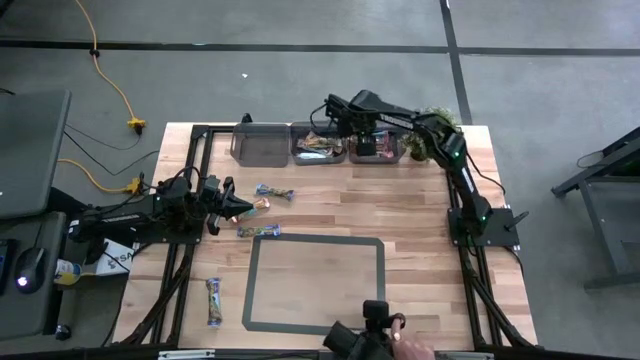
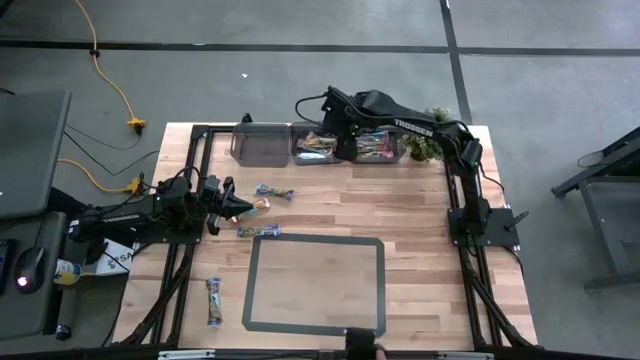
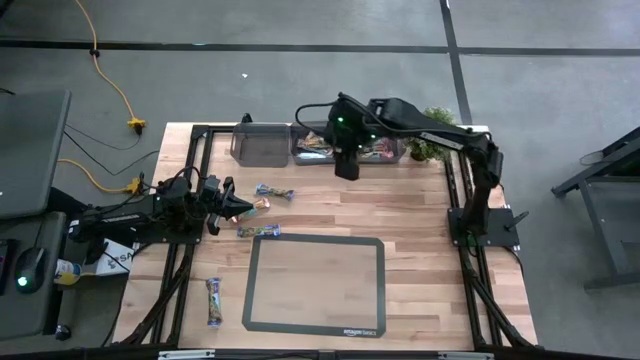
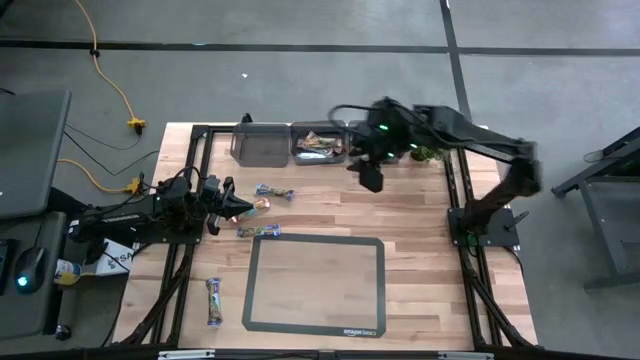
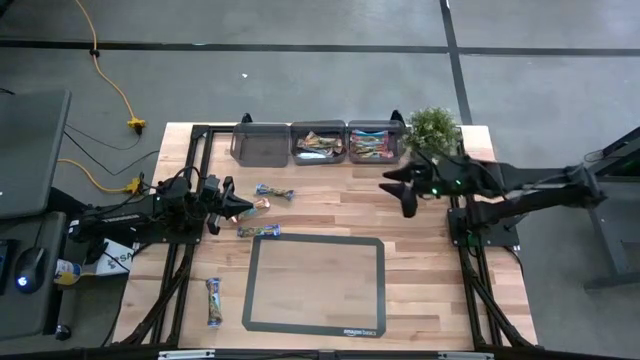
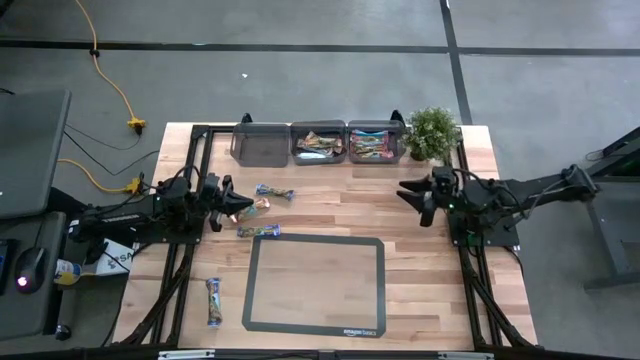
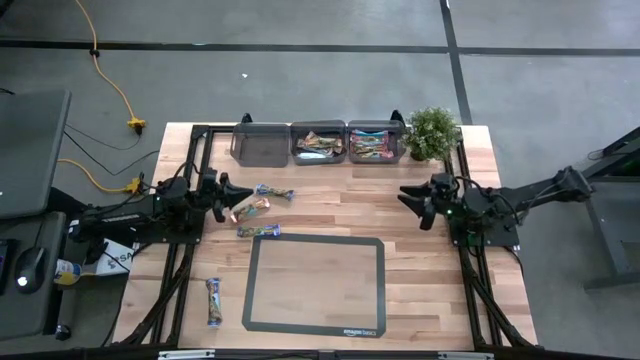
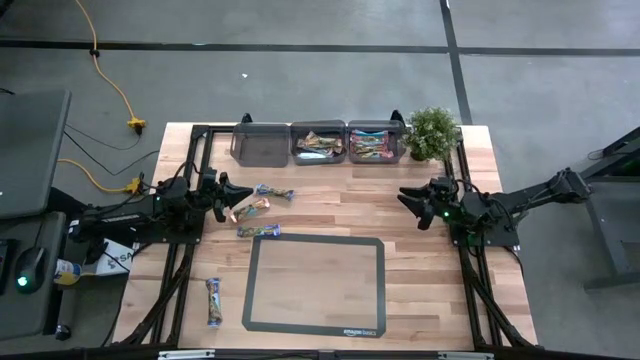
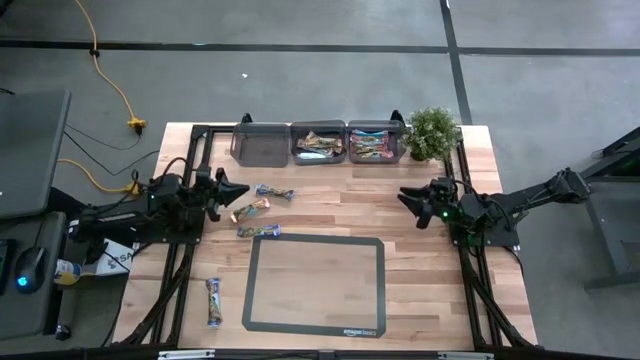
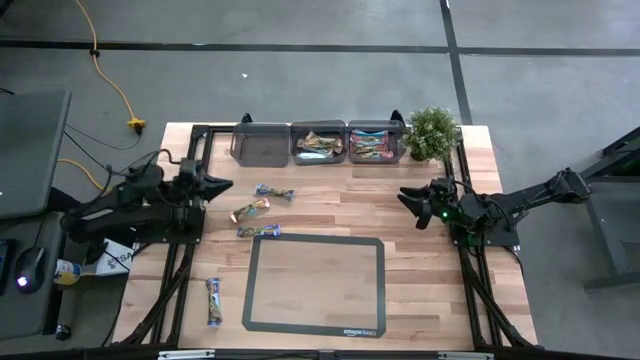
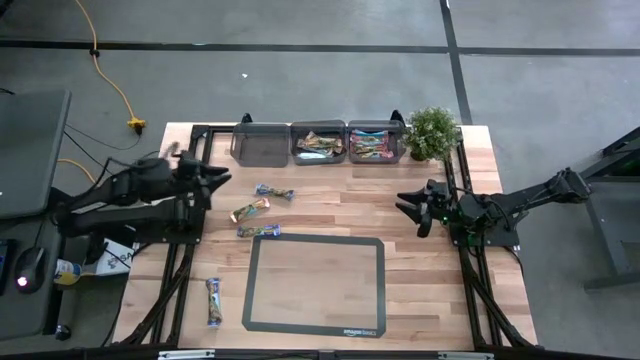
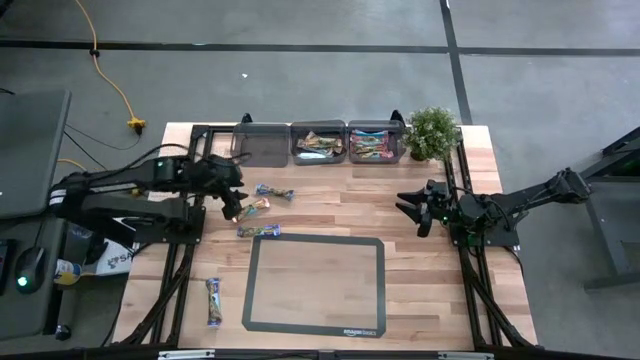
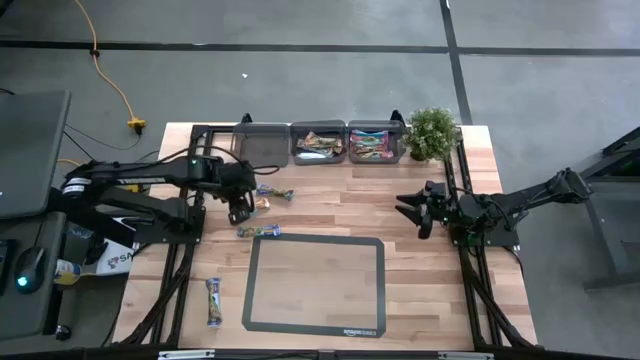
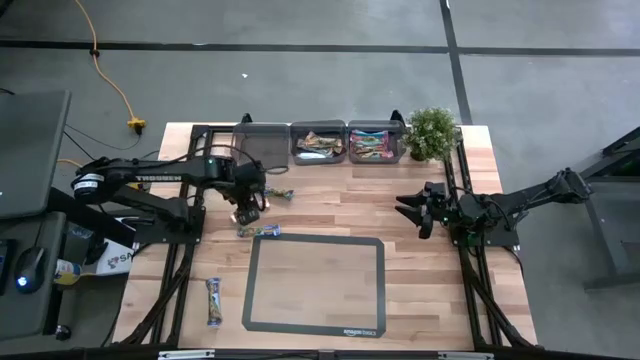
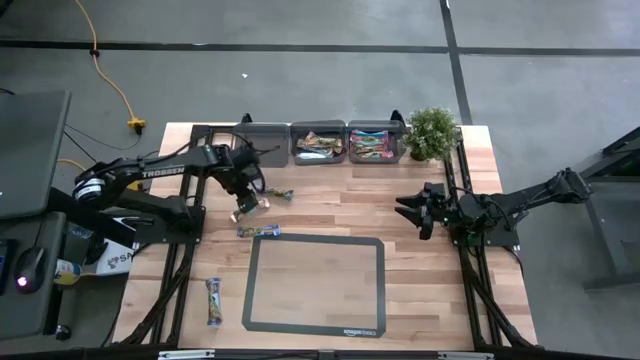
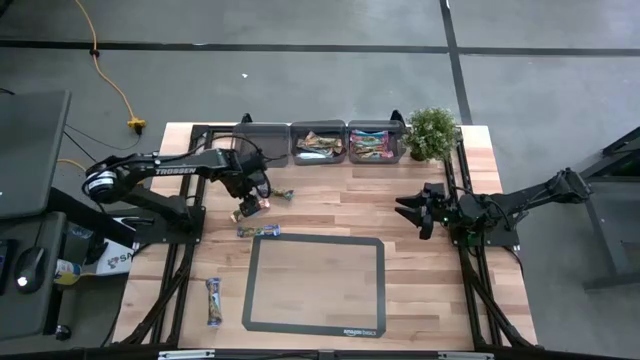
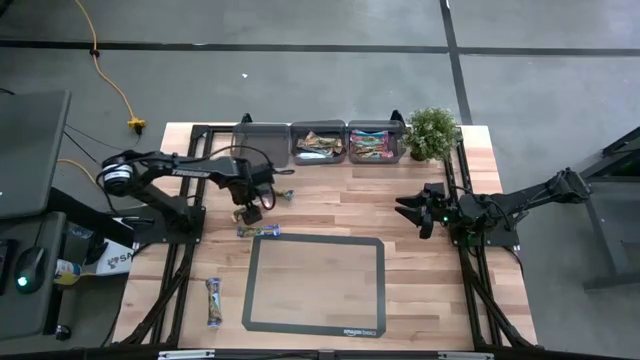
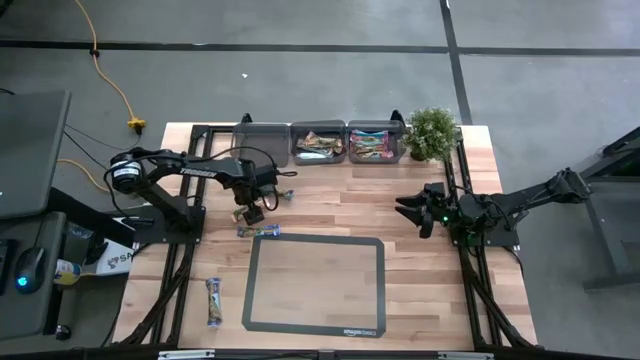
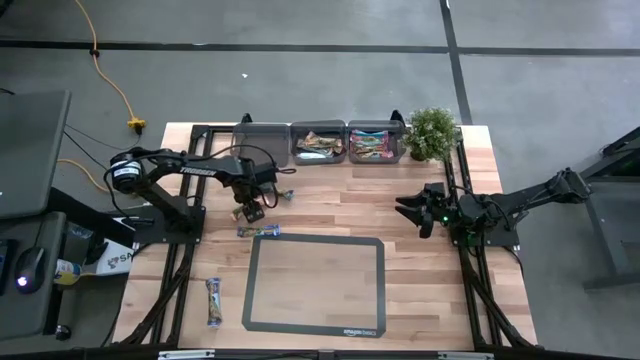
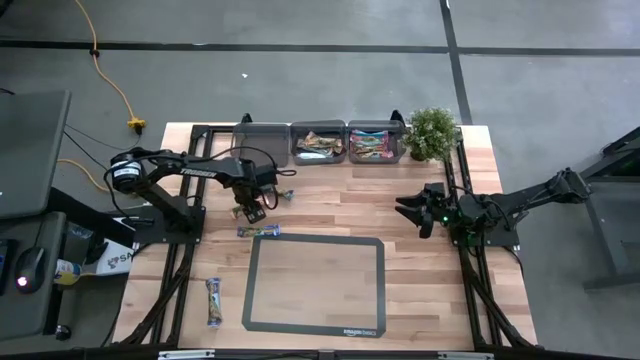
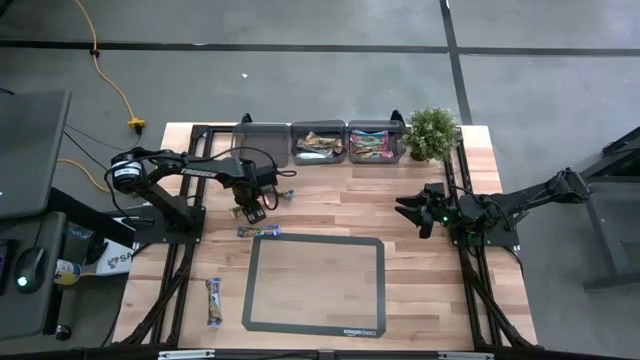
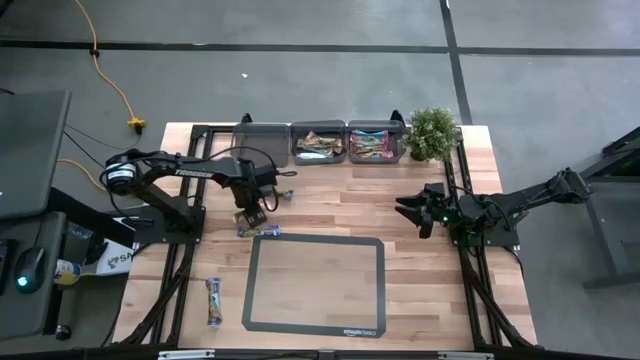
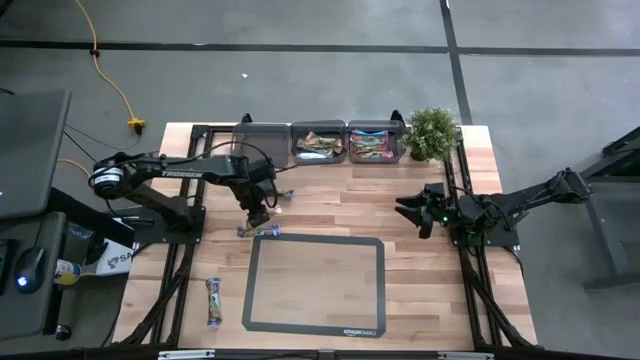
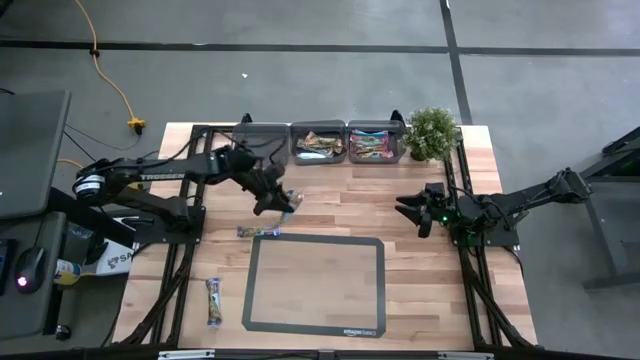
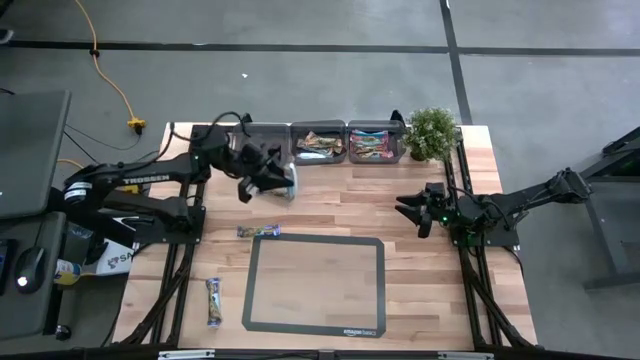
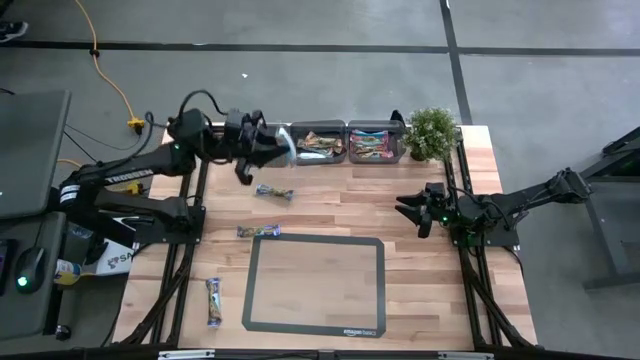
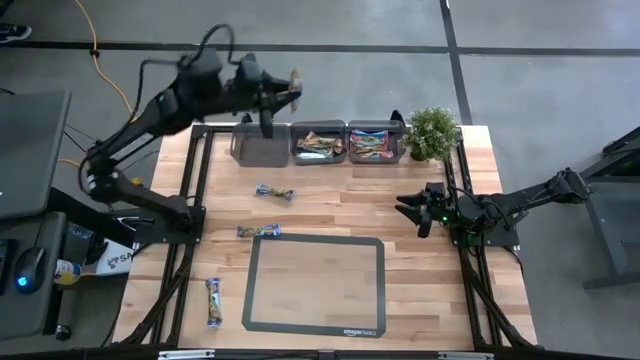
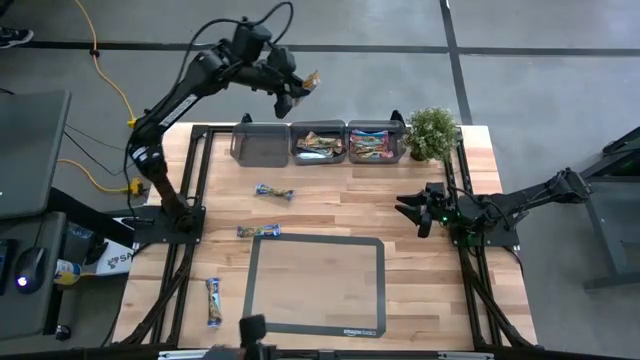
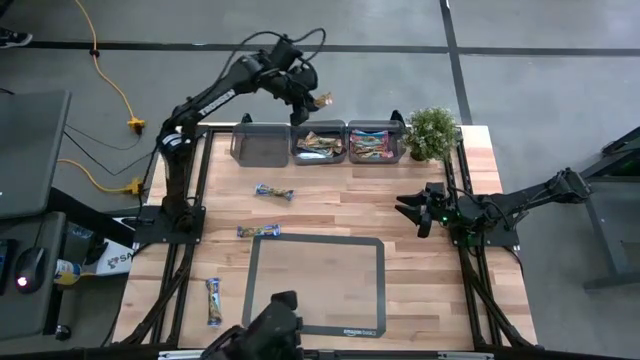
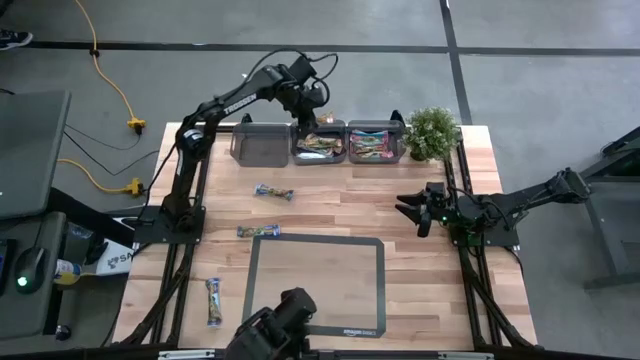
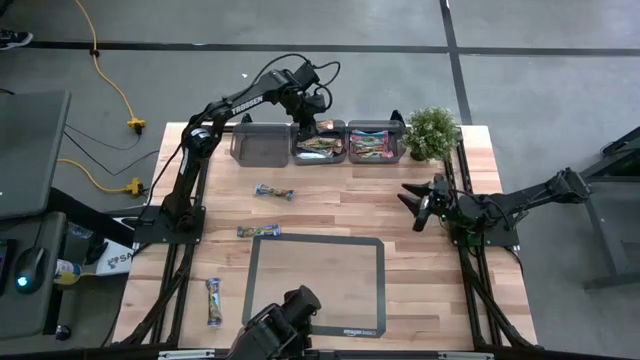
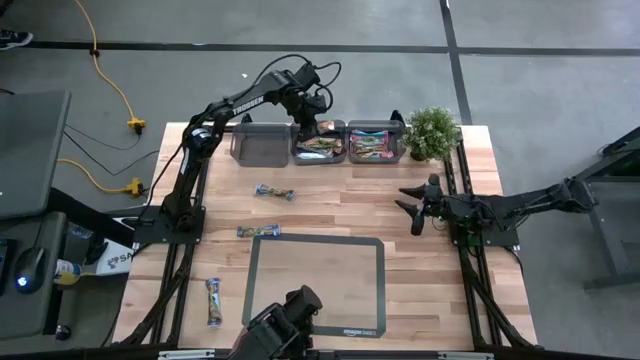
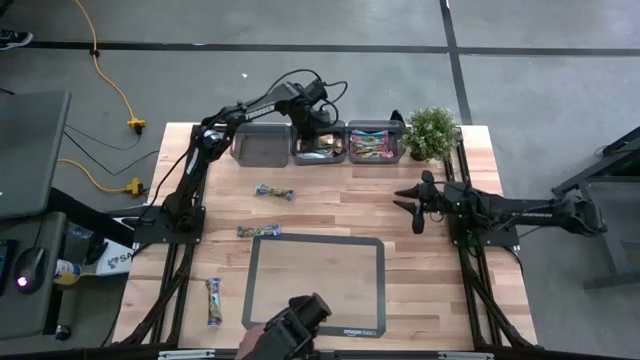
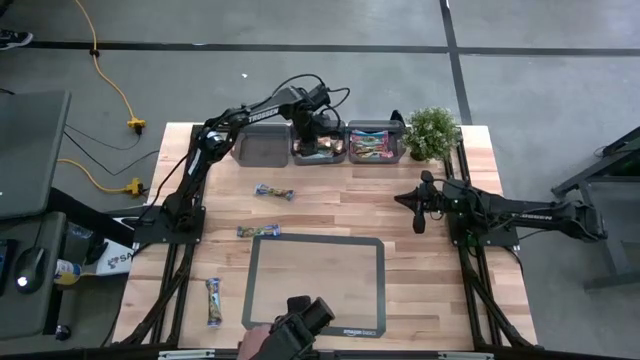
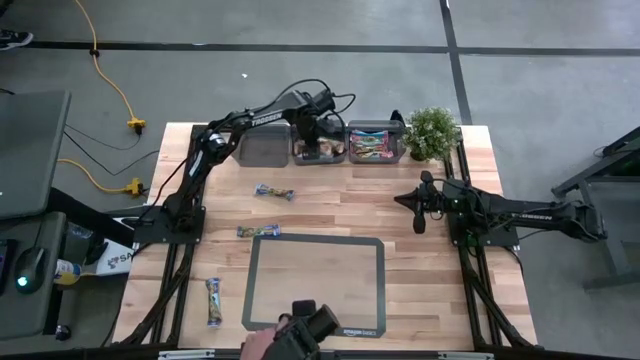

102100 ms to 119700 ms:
Task: Pick and place Granola Bars by type
Put the yellow granola bar into the middle black bin

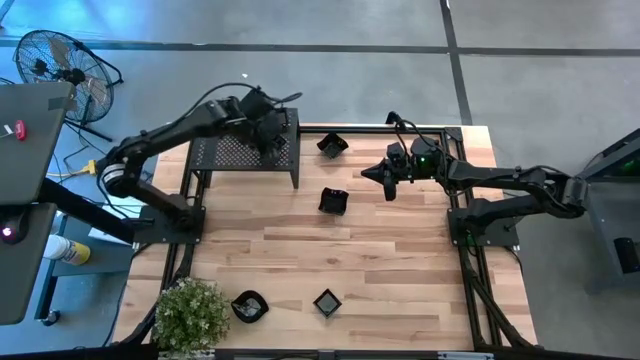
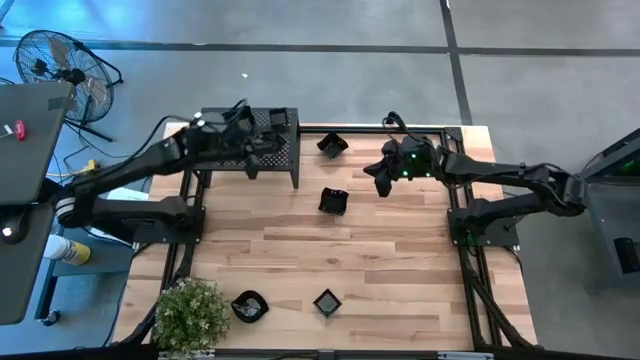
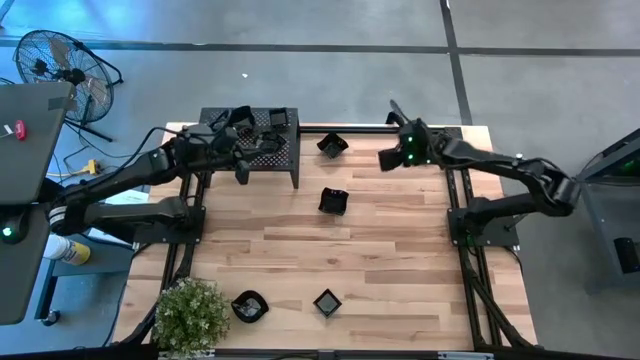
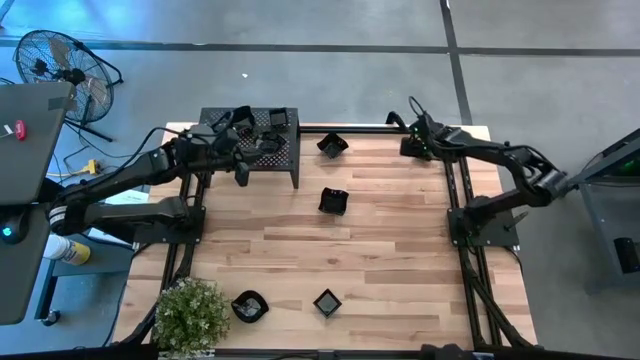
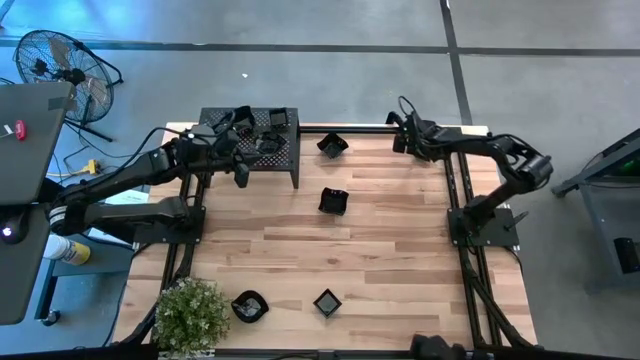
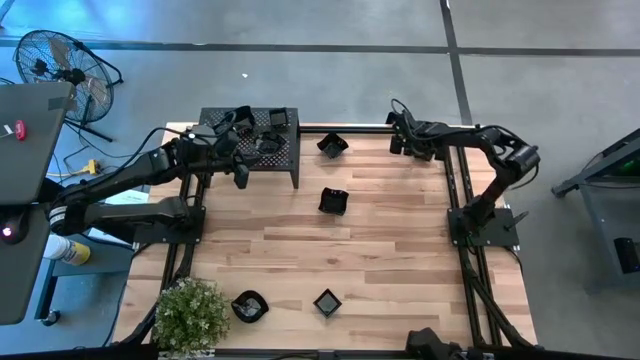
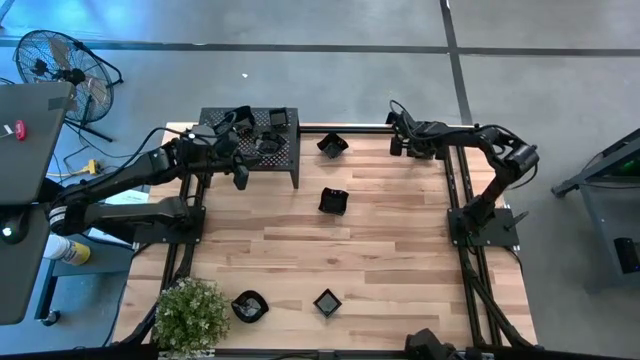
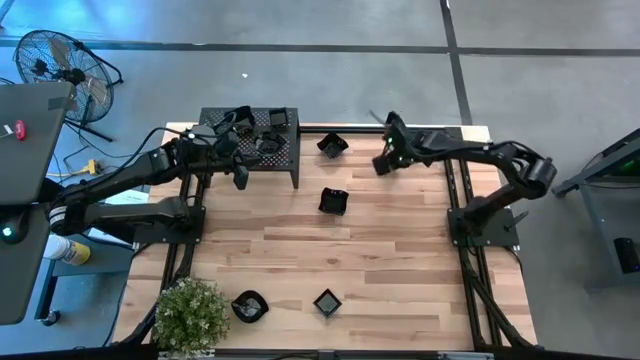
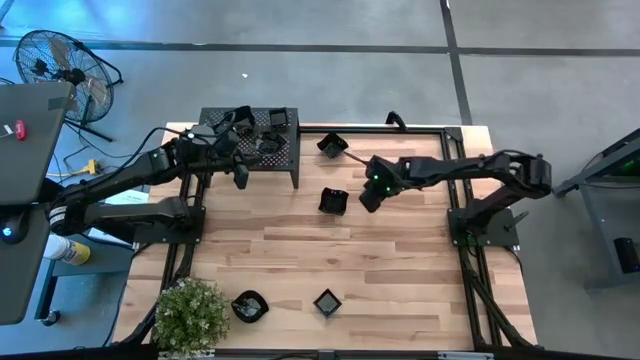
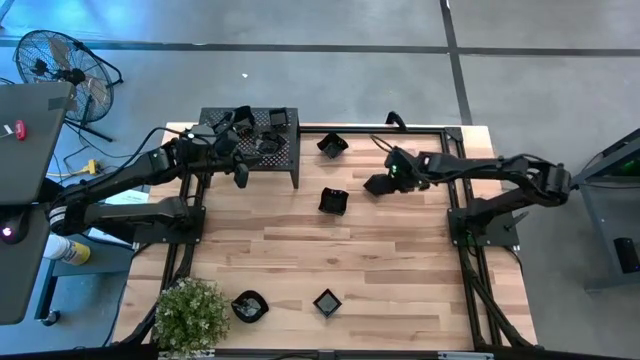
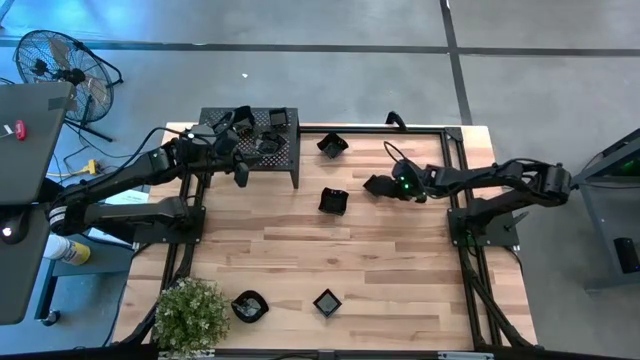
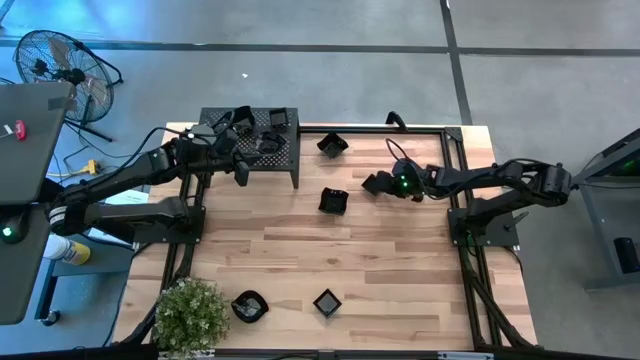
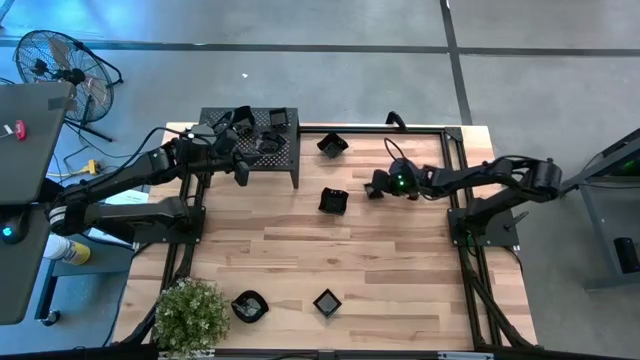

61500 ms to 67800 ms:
Task: Pick & Place Mini shaped plates
Stack the square plate on top of the other square plates on the shelf
